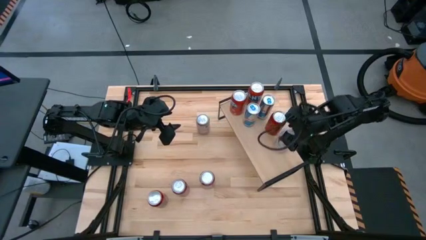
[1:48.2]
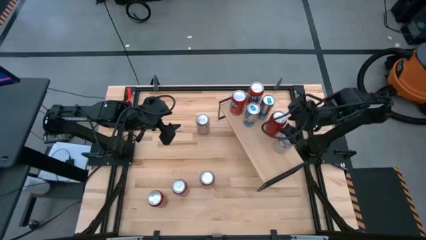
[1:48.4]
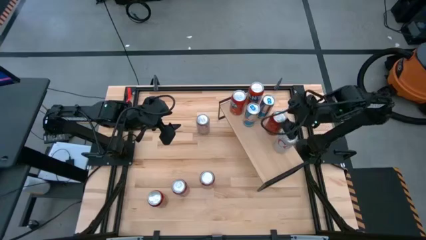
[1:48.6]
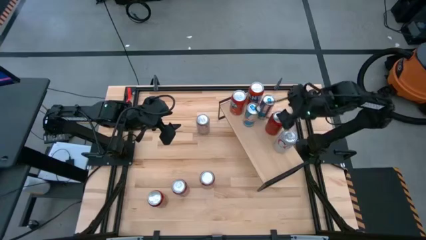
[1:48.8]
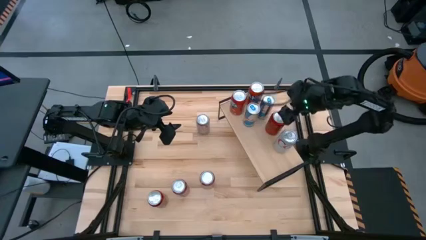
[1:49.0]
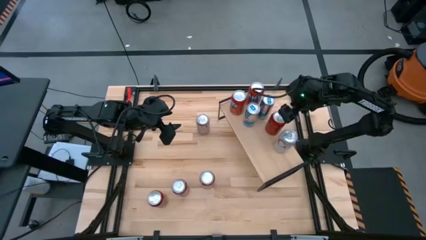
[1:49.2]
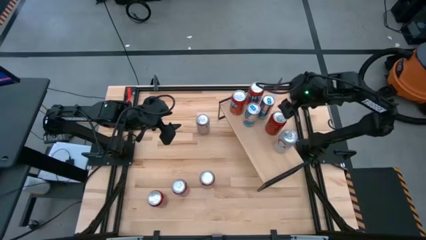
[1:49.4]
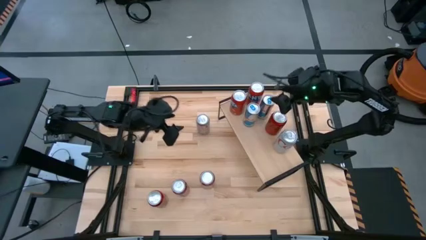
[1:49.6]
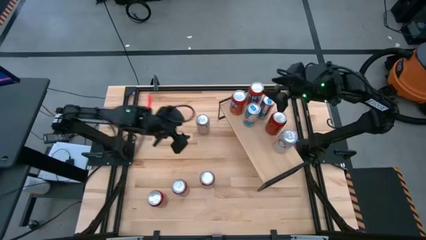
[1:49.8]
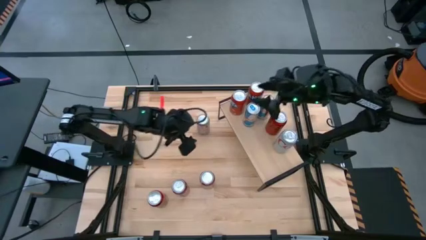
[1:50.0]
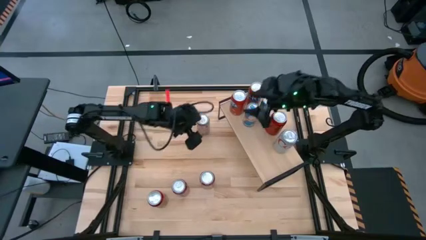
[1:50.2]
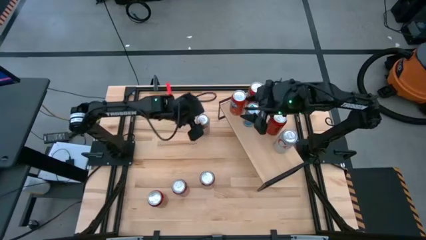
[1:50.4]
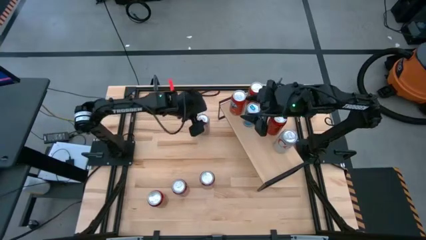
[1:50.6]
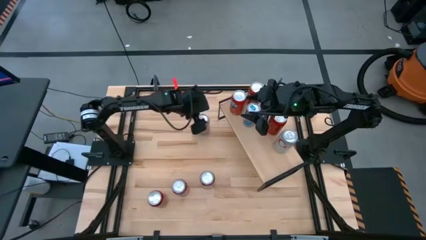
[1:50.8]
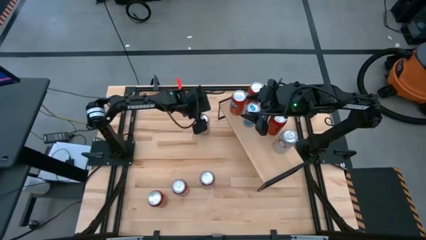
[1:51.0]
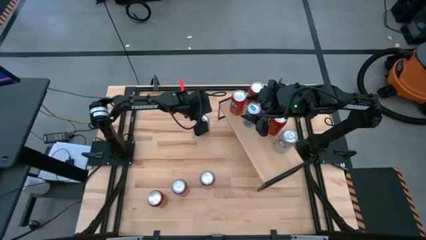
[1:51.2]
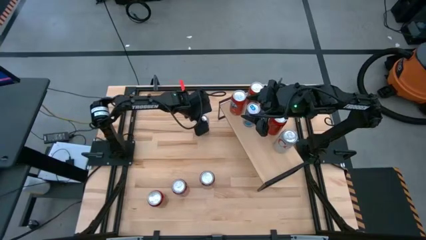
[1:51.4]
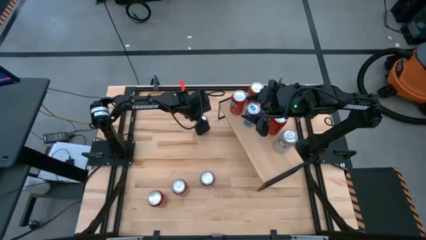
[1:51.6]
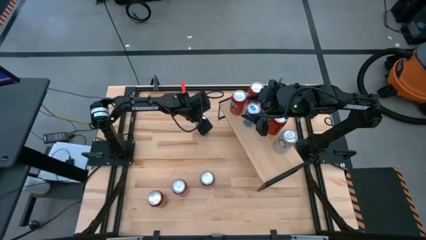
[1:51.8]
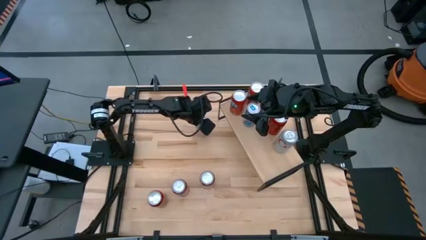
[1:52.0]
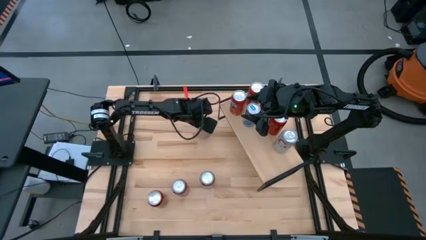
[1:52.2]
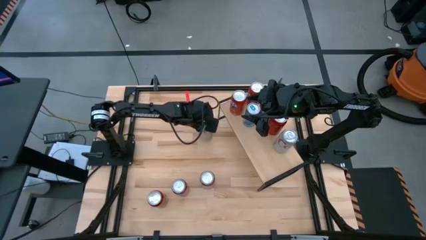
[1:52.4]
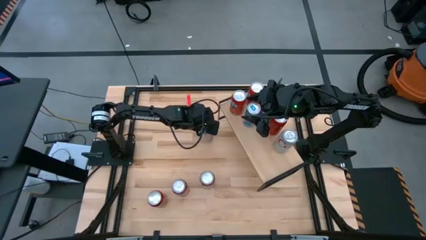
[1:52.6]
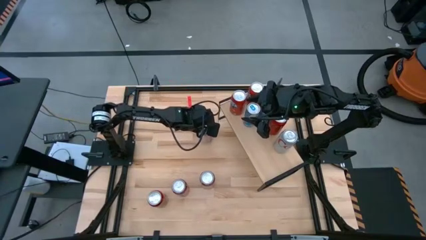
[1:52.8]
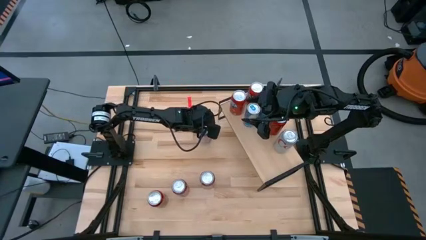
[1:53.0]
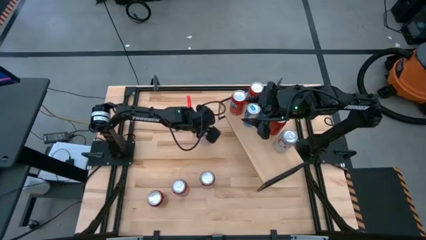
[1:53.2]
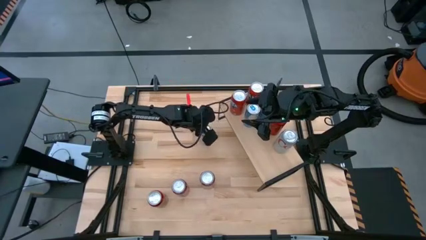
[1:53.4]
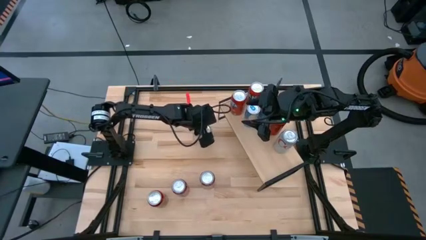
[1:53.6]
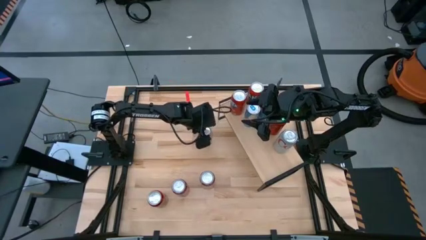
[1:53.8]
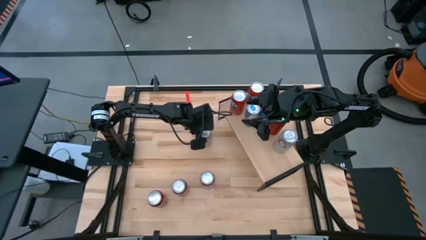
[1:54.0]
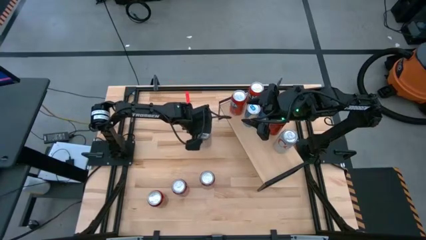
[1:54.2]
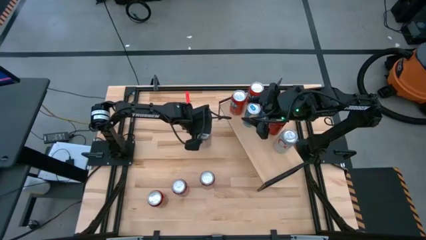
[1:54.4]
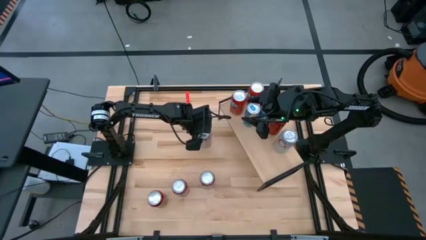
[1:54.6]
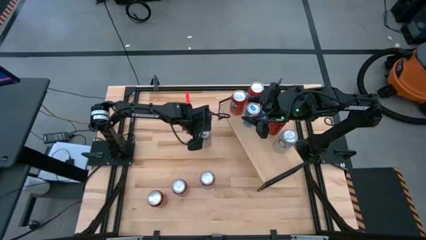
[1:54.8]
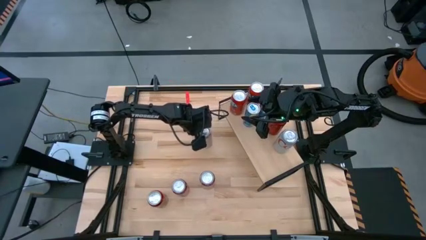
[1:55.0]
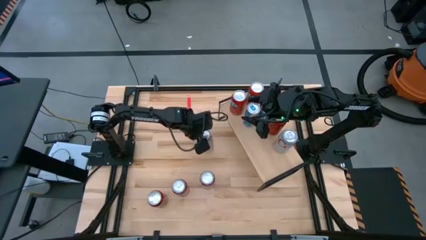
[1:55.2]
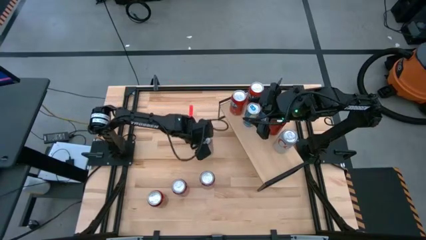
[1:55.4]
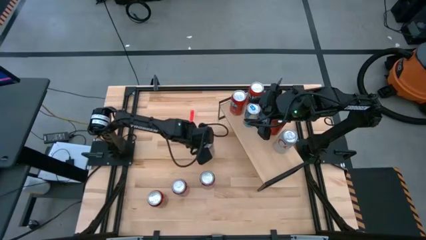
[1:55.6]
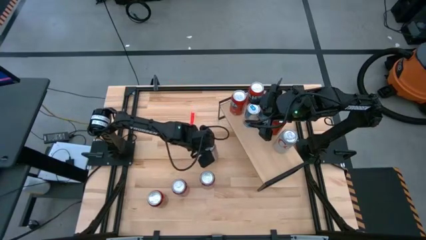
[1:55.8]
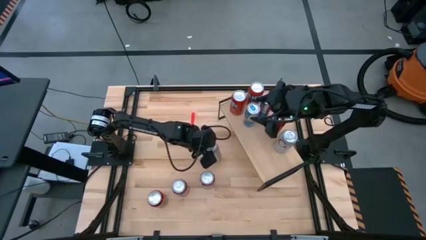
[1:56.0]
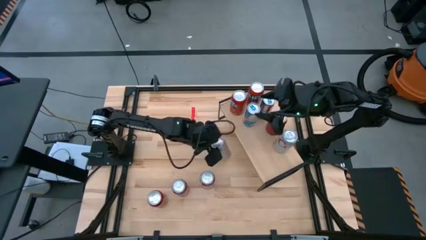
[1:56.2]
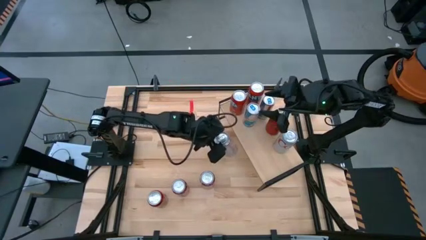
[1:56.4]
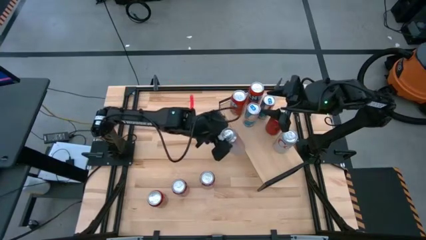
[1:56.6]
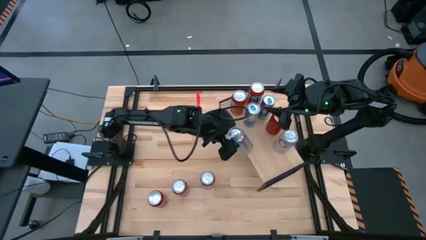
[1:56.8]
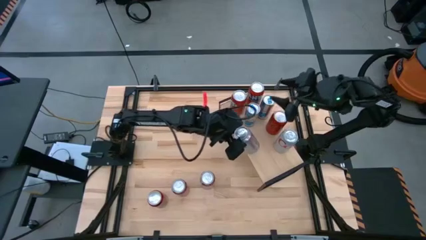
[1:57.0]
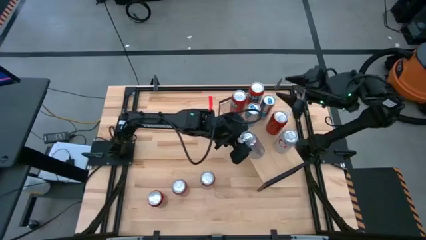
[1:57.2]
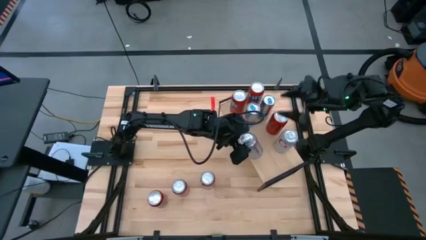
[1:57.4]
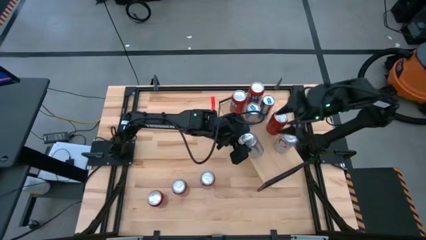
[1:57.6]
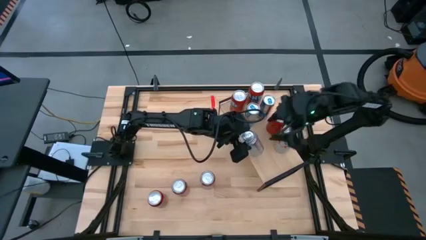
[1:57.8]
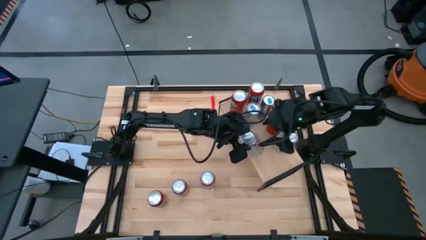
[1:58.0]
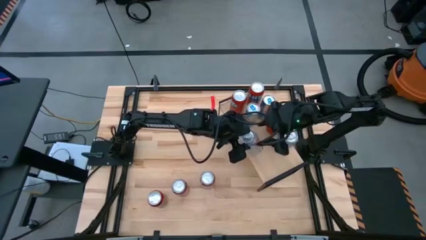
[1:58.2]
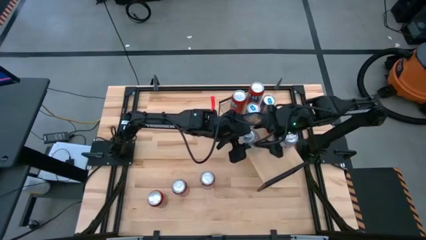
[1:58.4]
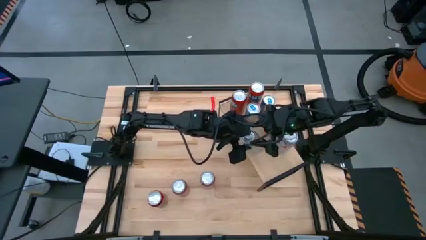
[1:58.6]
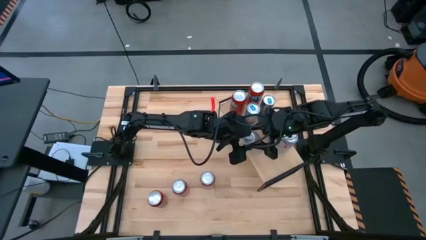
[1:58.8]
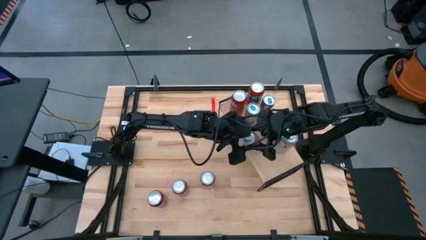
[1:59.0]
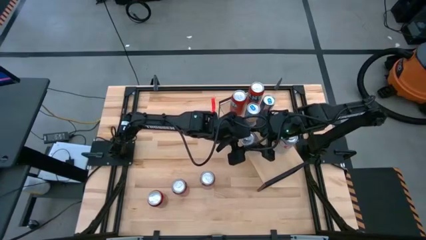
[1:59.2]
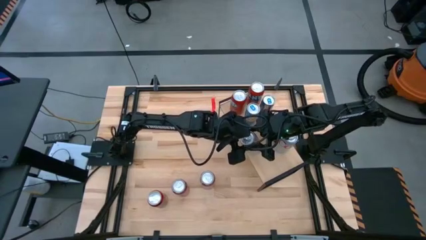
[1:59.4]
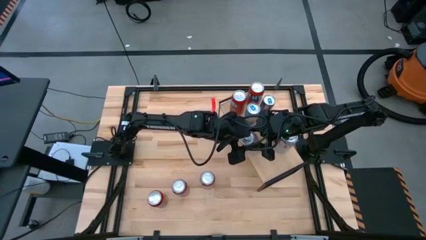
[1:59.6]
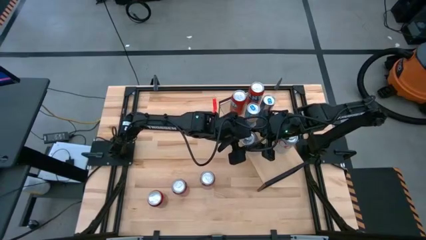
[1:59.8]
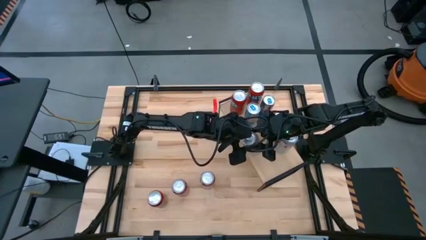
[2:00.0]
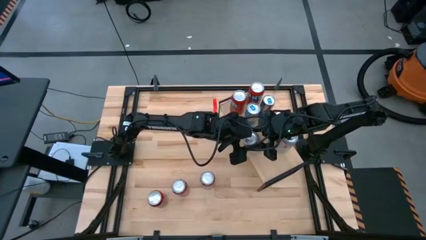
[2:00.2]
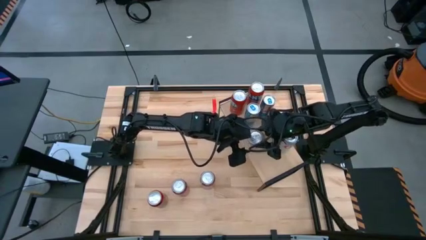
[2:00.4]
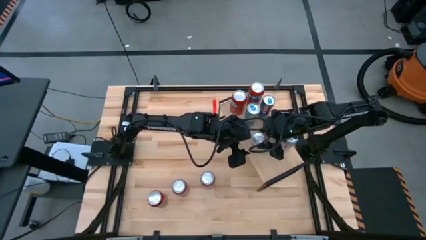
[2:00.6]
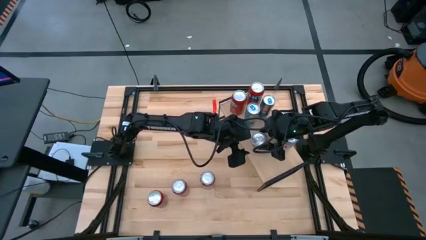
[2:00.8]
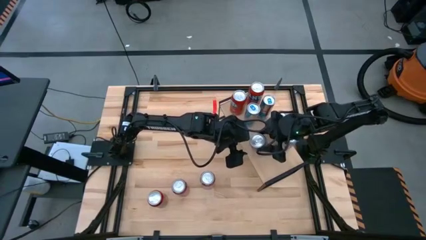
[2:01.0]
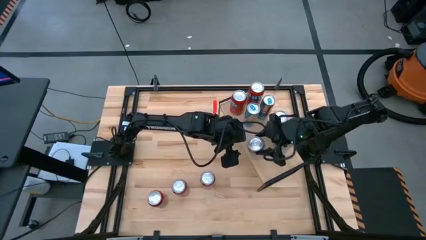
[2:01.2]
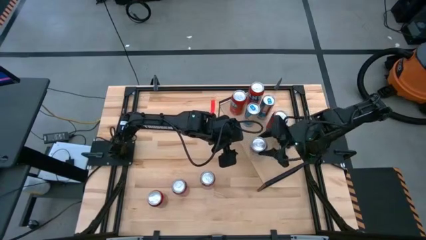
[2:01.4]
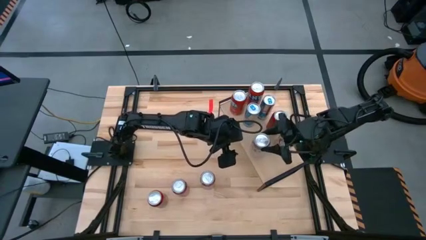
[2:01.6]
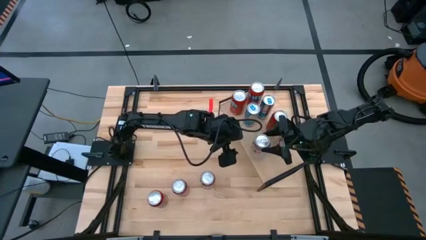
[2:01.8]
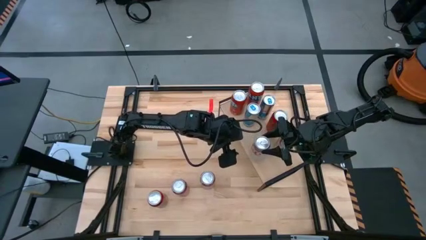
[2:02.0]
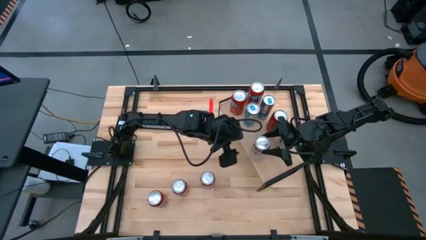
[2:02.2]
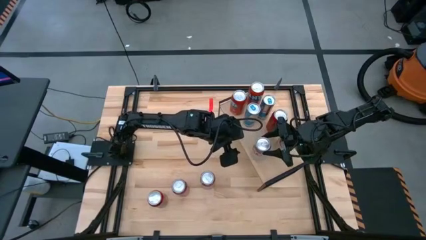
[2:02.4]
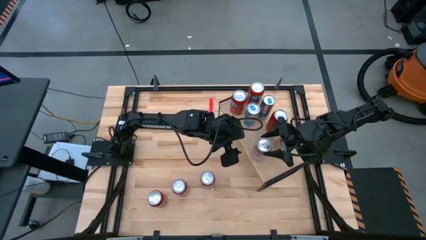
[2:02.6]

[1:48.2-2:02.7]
Task: Place canned beverage on shelf
Put the white soda can aligned with the other white soda can on the shelf
